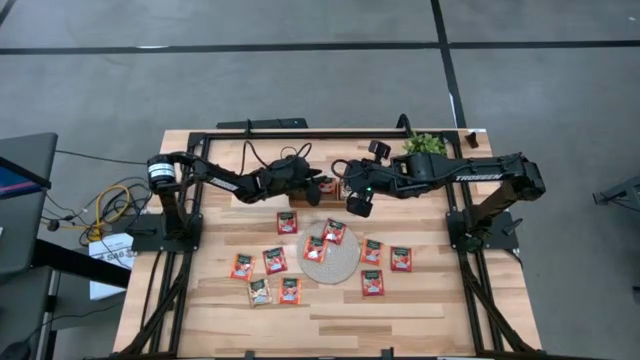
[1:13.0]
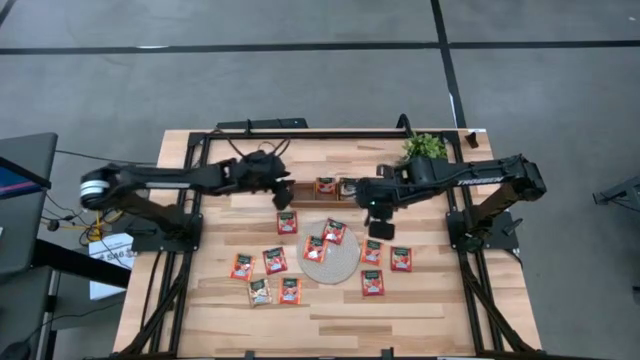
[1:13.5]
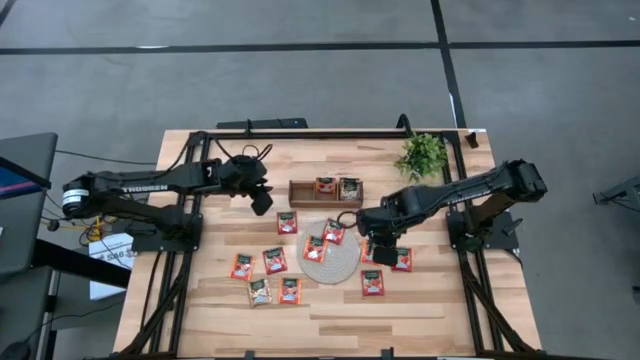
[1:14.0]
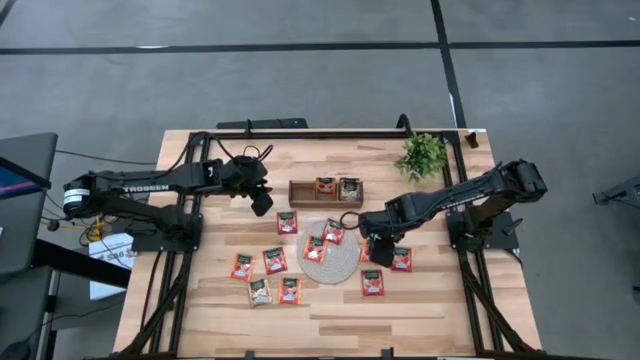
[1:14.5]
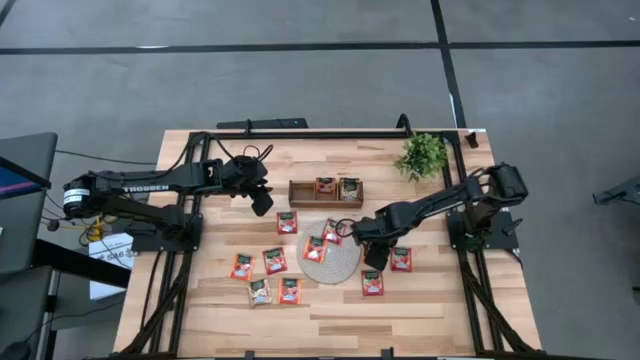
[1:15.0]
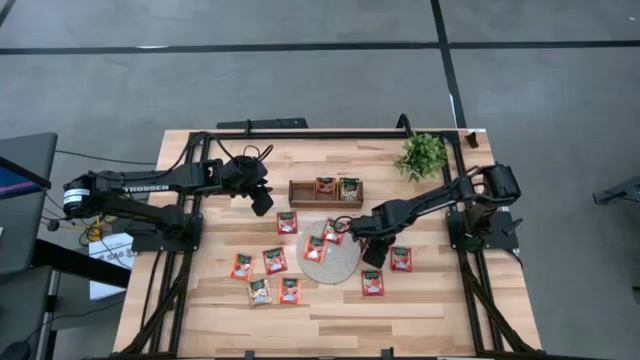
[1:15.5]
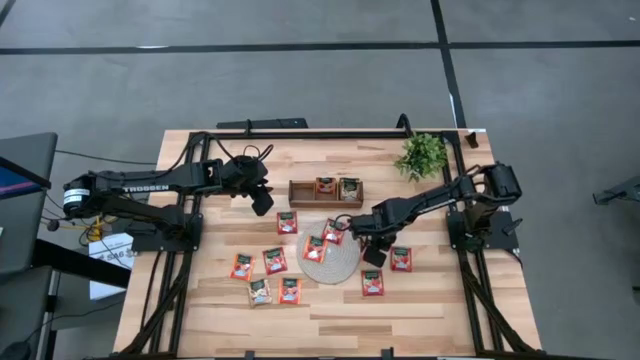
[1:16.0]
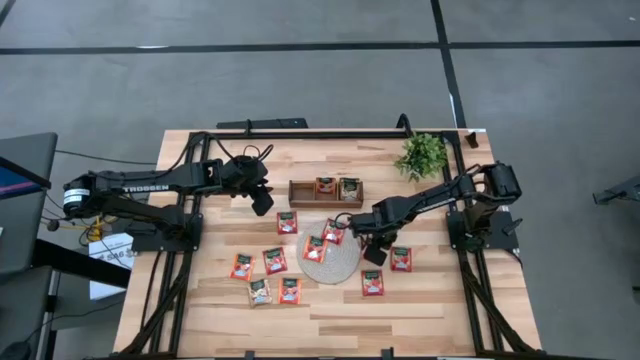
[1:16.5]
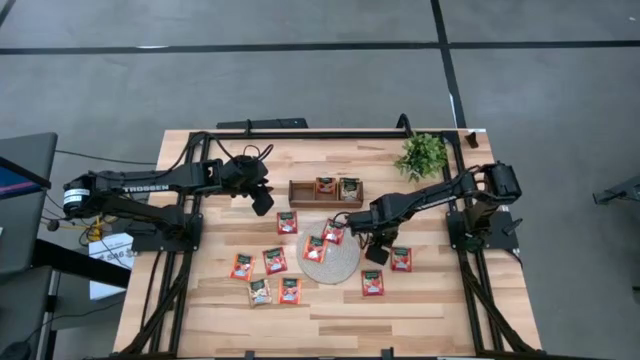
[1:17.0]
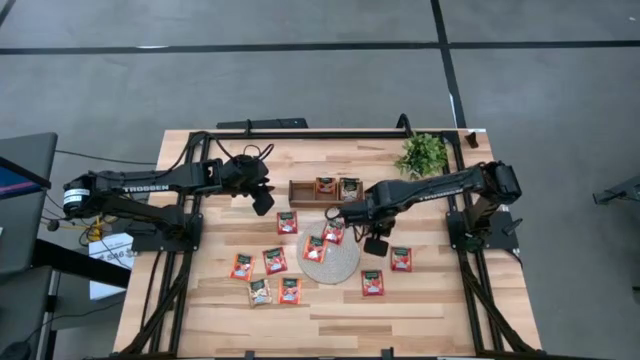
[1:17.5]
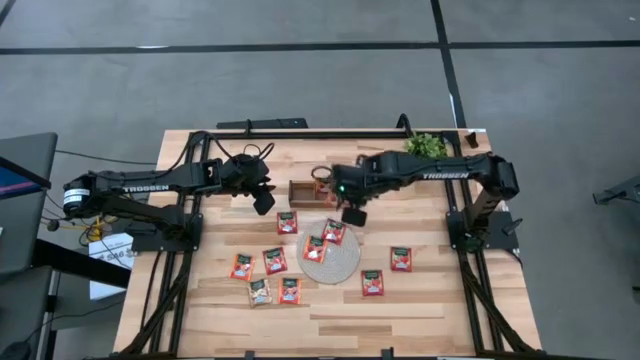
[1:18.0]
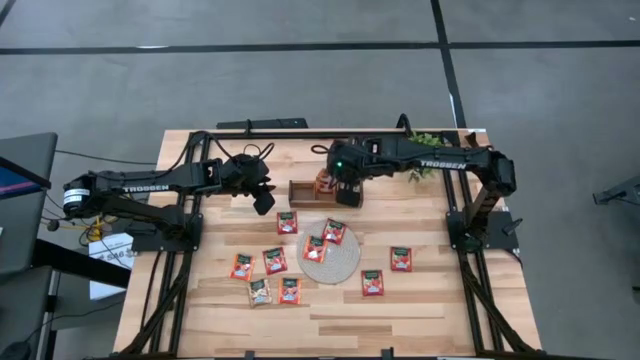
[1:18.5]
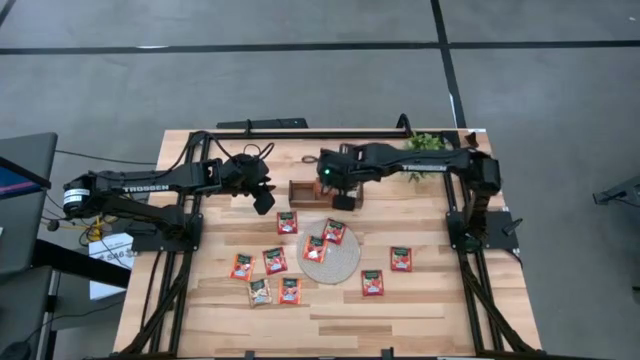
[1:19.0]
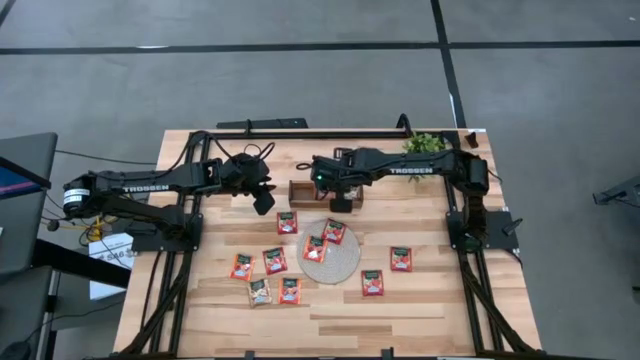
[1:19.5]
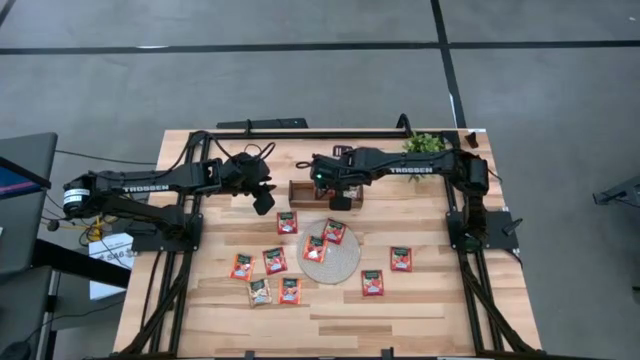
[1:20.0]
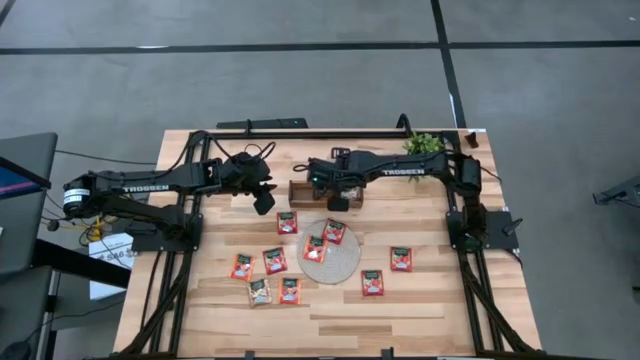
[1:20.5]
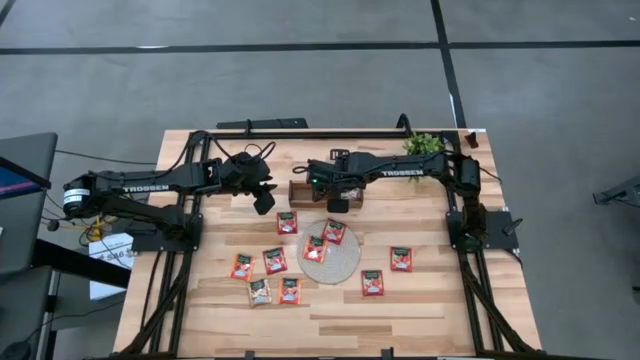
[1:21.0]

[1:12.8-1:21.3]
Task: Pick & Place Tea
Put the orange tea bag into the middle section of the wooden organizer

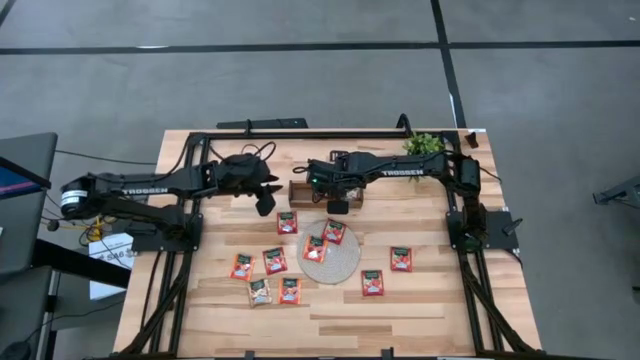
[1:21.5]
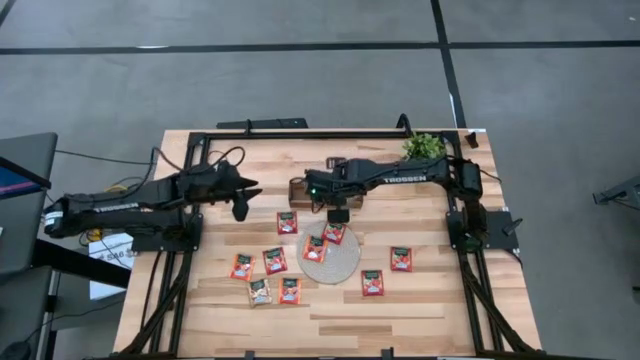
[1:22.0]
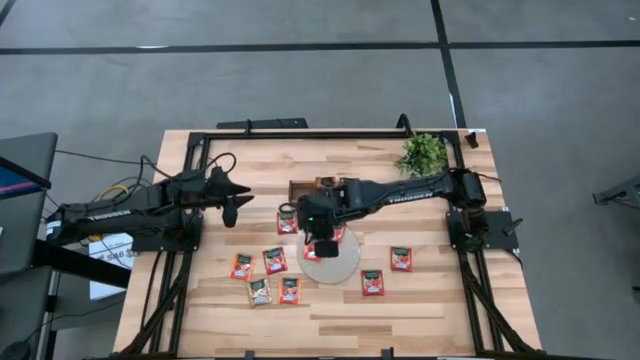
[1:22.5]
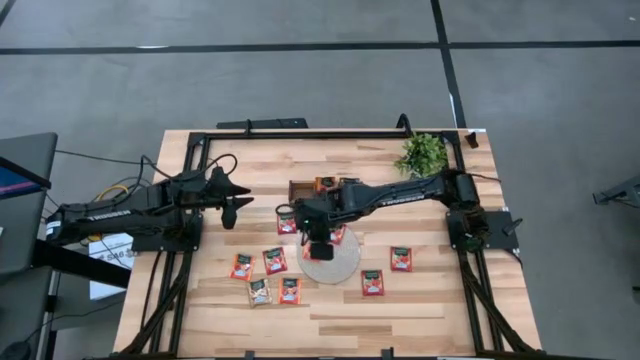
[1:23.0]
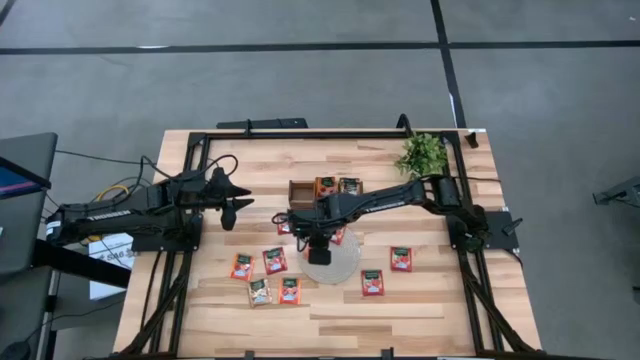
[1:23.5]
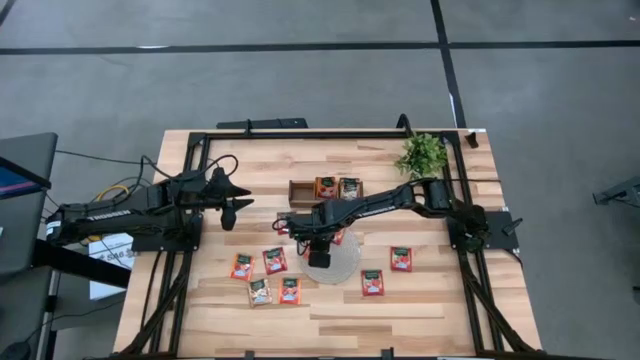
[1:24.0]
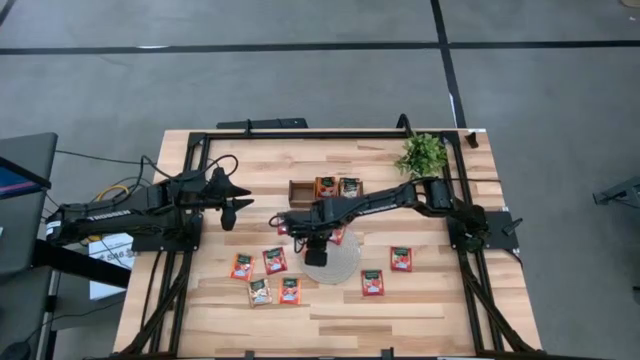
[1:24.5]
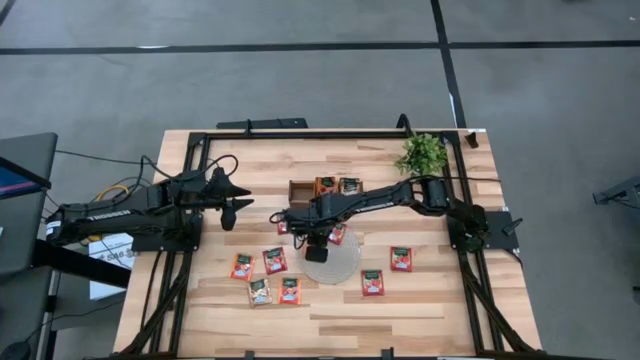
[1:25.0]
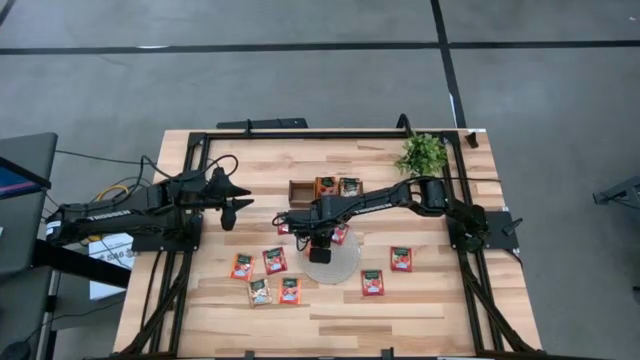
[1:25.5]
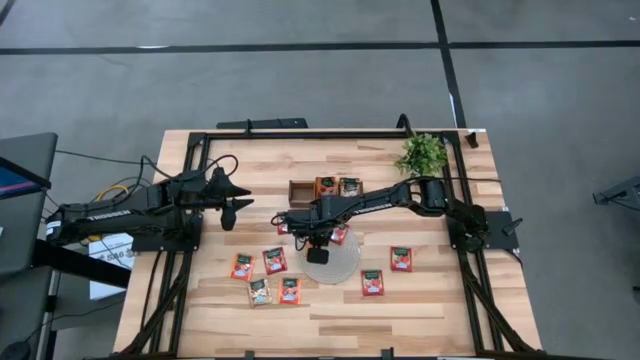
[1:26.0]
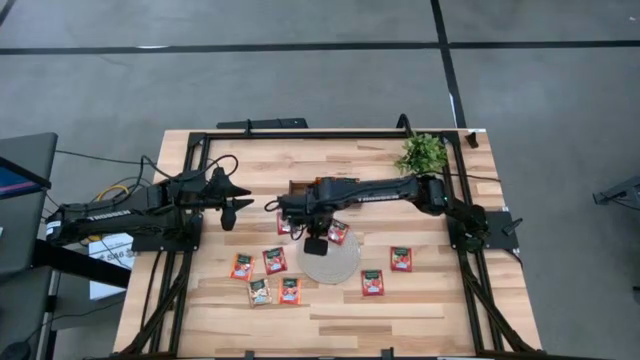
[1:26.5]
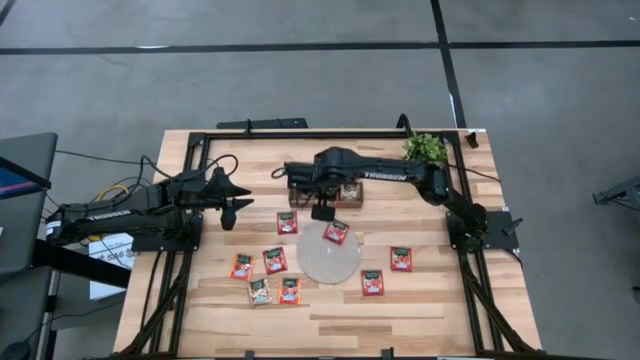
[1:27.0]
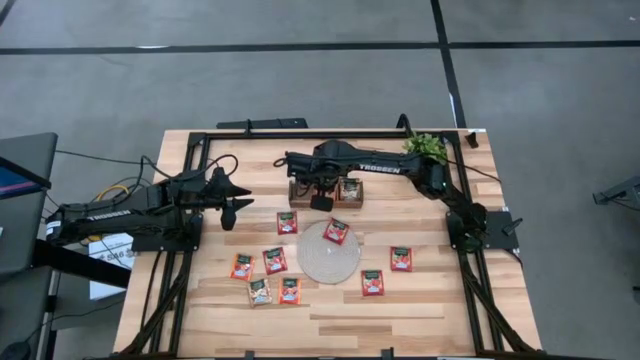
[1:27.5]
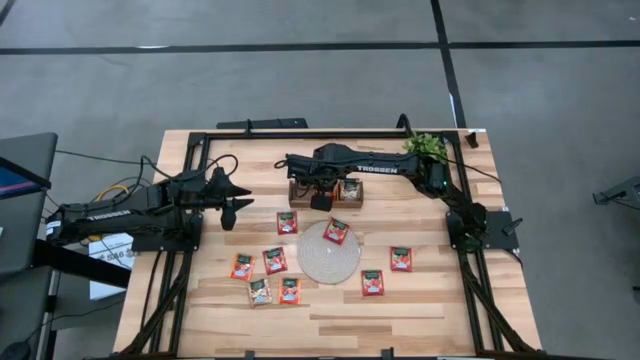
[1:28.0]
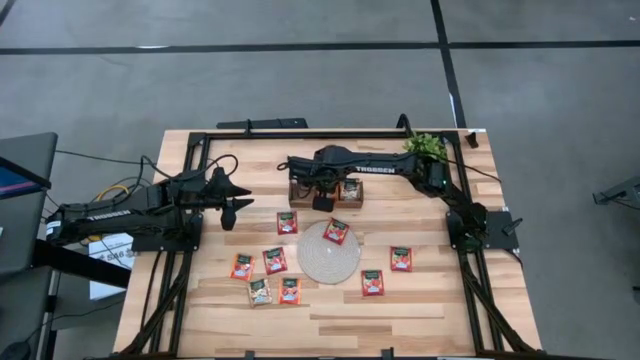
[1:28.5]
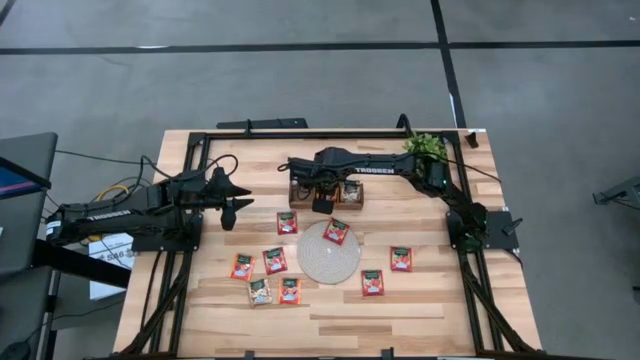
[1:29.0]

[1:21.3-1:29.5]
Put the orange tea bag into the middle section of the wooden organizer

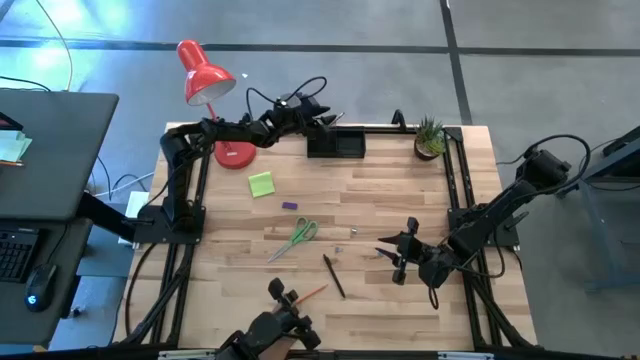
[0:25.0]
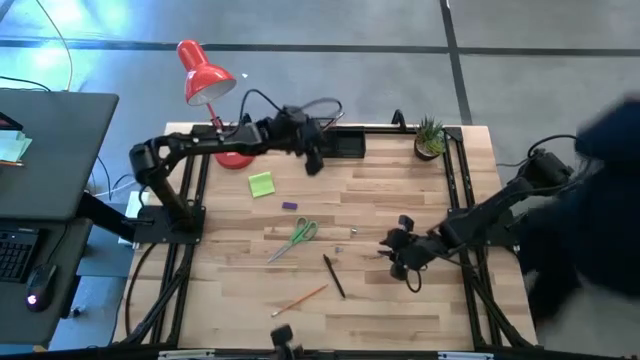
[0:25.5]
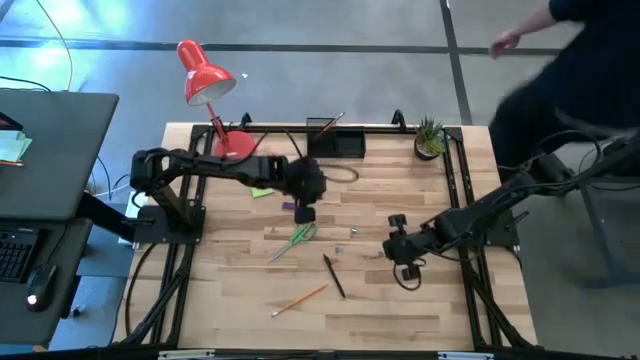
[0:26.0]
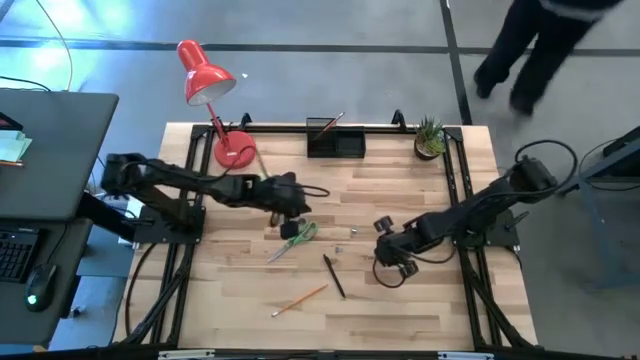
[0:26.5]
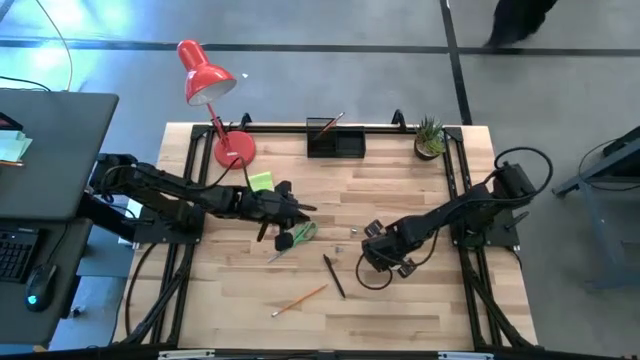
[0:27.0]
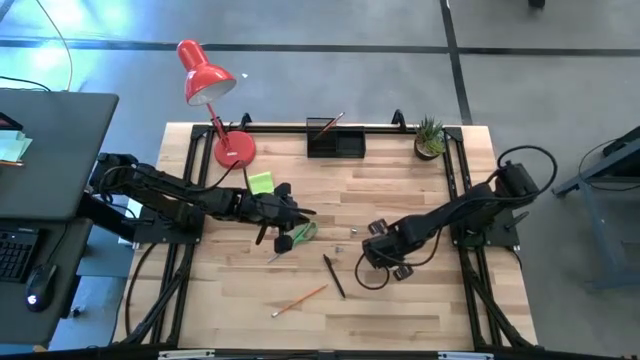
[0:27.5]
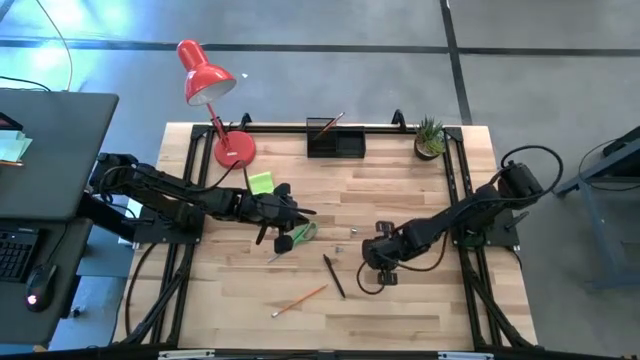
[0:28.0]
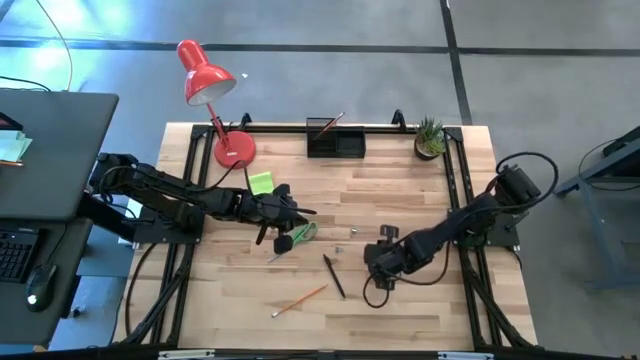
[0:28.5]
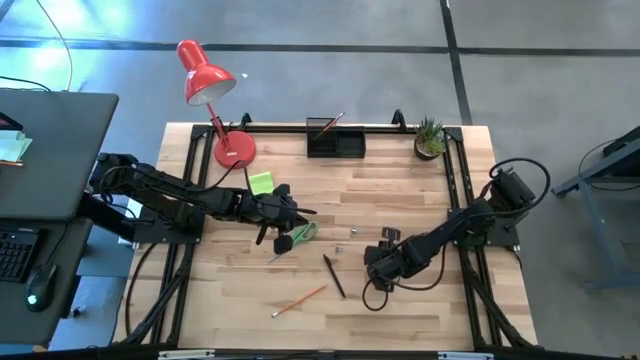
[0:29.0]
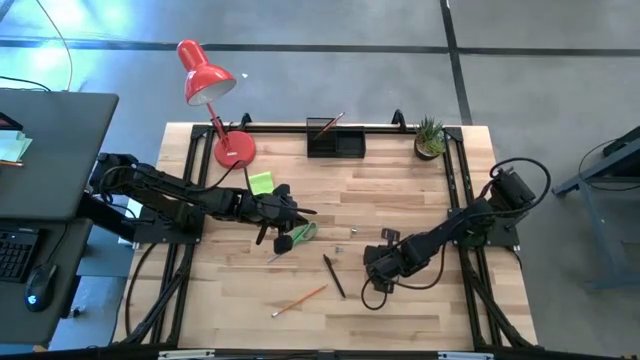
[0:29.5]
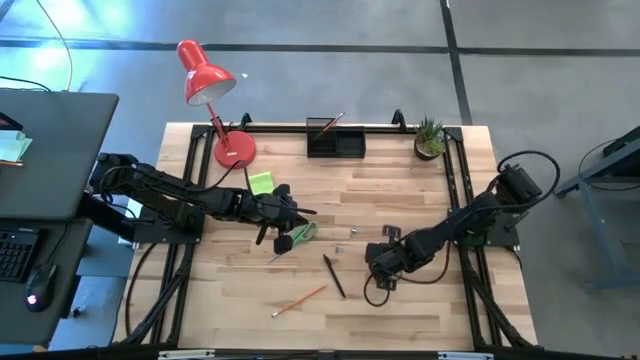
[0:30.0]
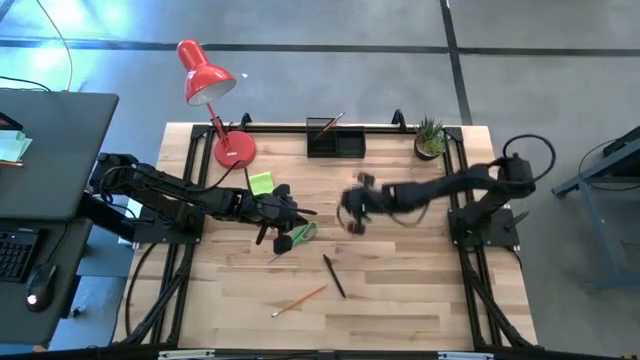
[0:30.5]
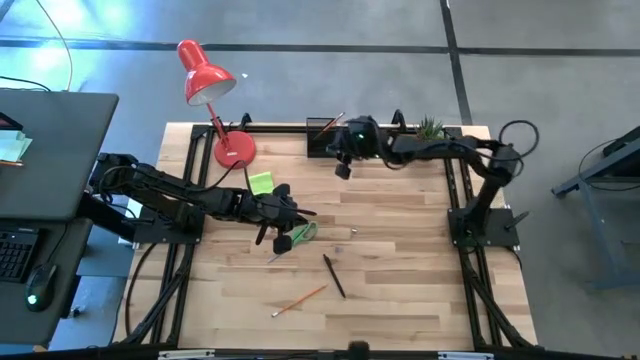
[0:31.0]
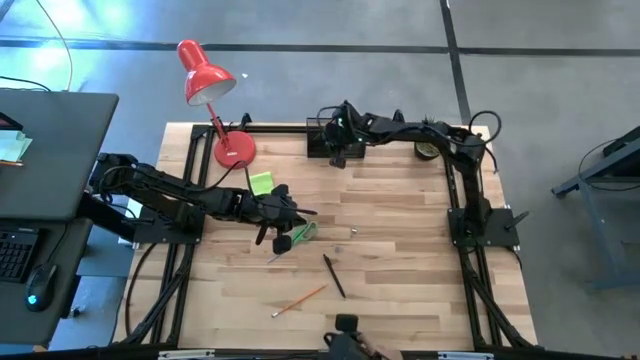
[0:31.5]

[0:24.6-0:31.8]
Task: Pick and place office supplies into organizer
Put the bottom right blue binder clip into the desk organizer
